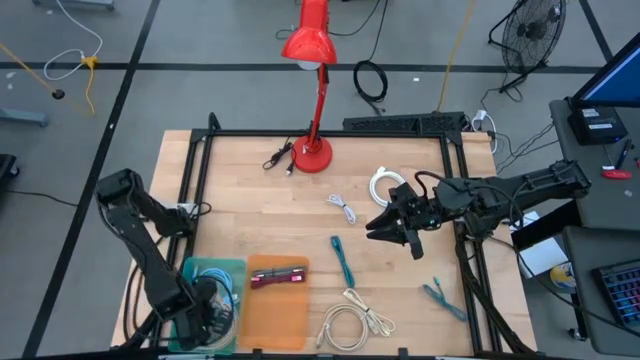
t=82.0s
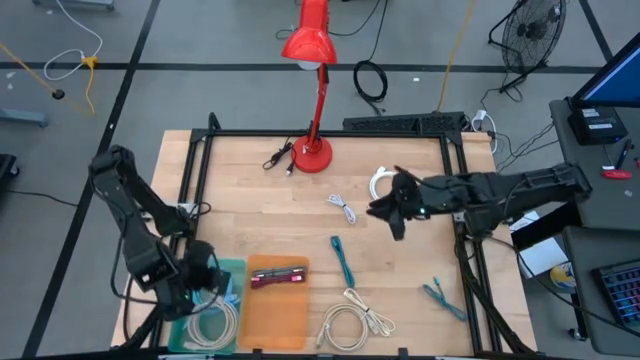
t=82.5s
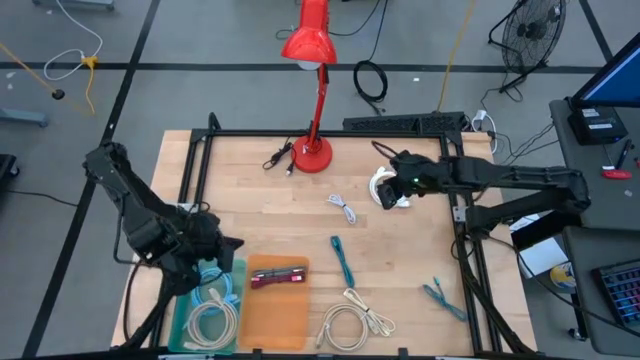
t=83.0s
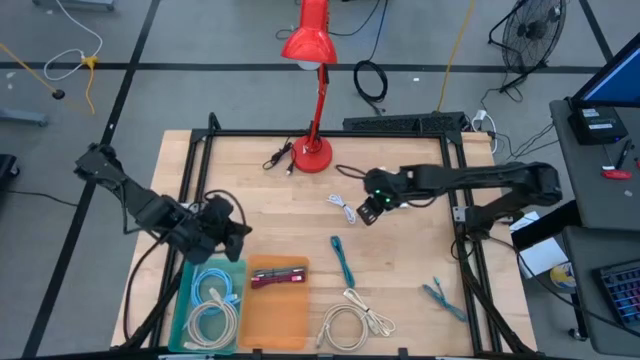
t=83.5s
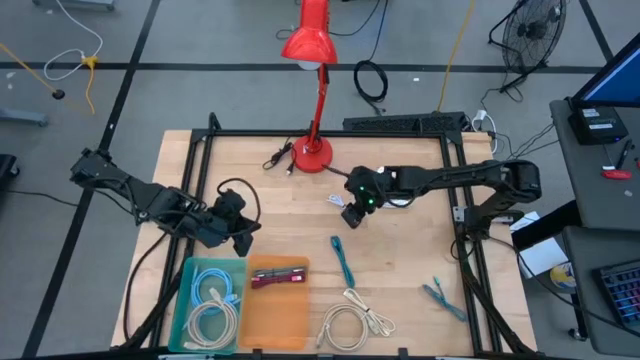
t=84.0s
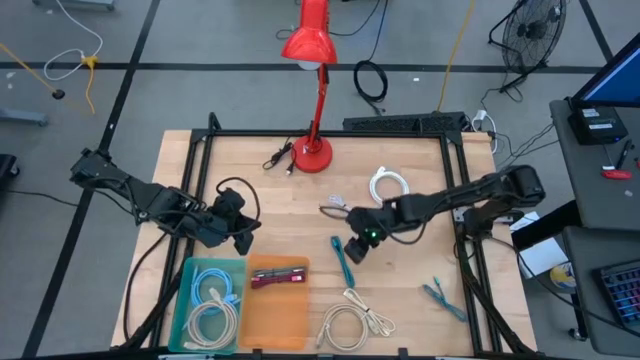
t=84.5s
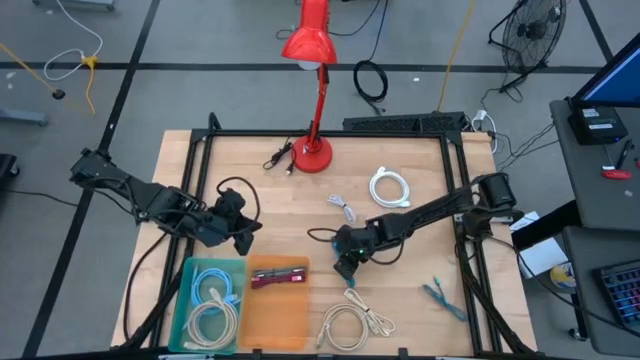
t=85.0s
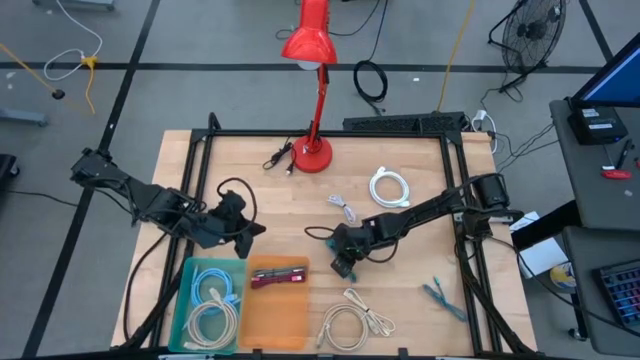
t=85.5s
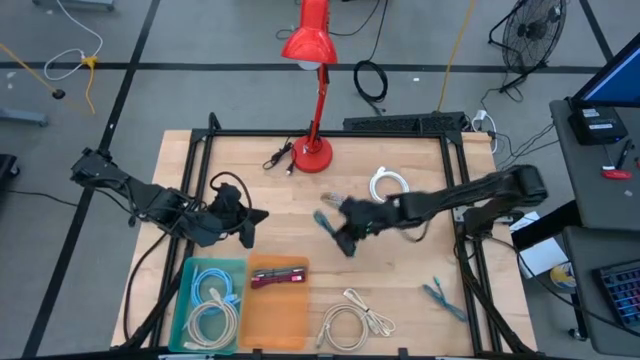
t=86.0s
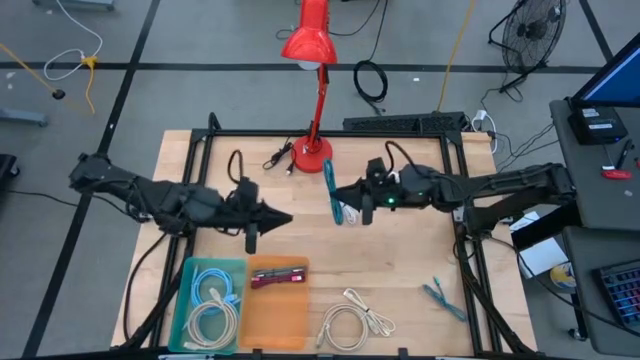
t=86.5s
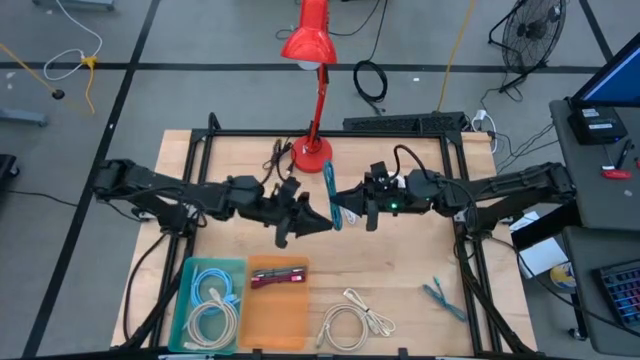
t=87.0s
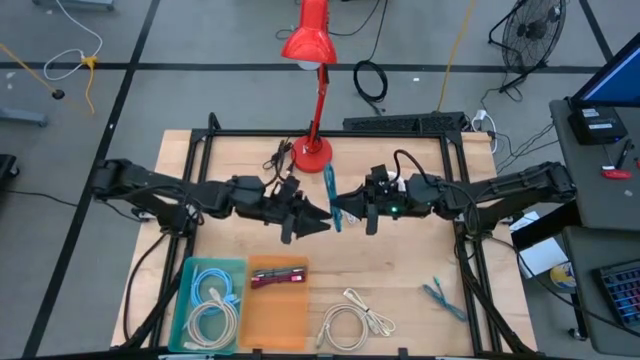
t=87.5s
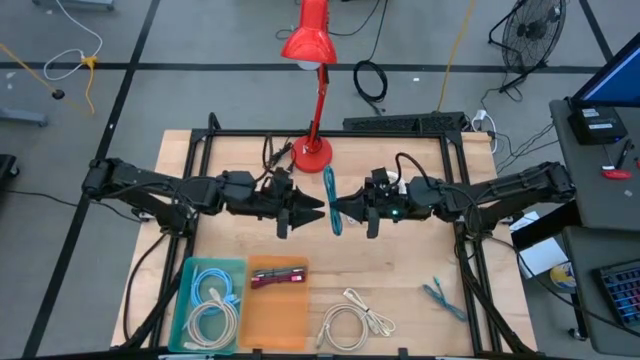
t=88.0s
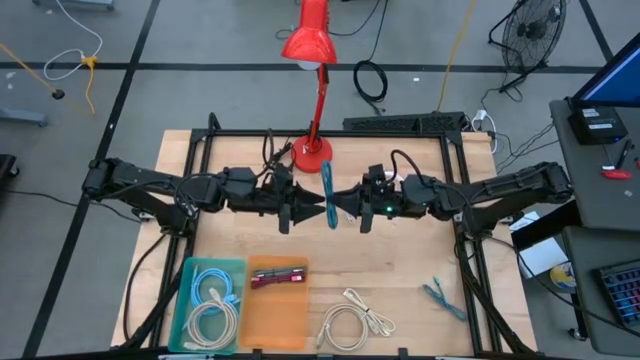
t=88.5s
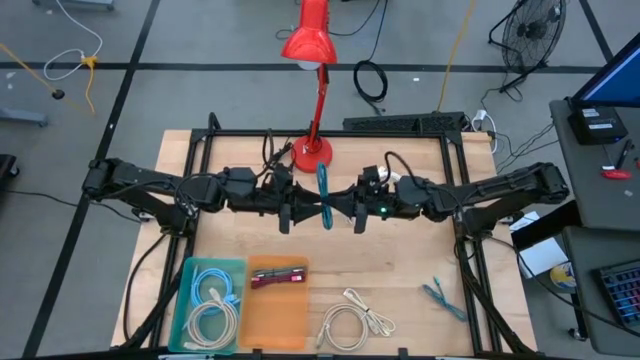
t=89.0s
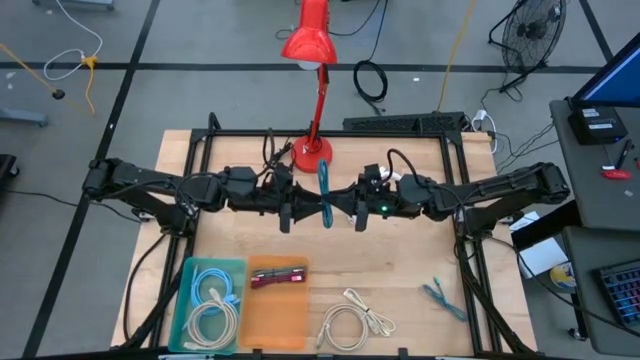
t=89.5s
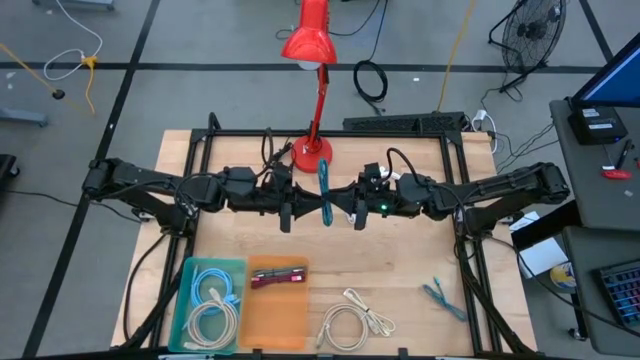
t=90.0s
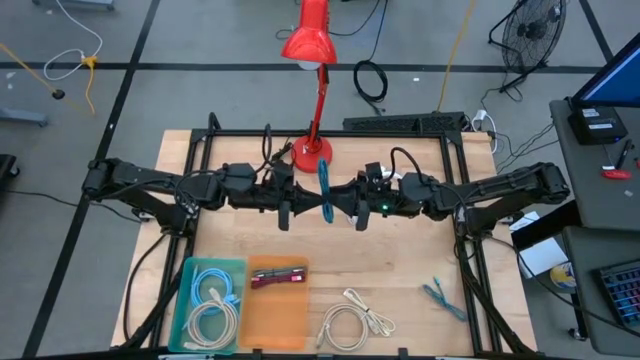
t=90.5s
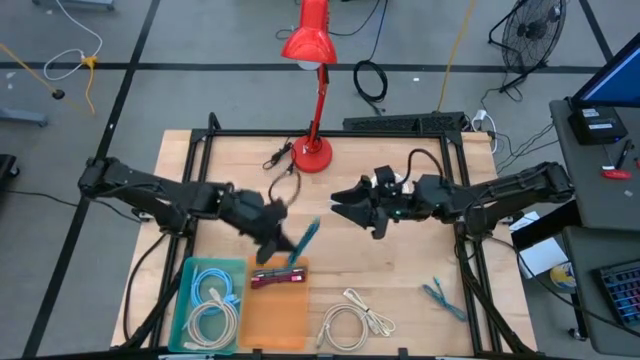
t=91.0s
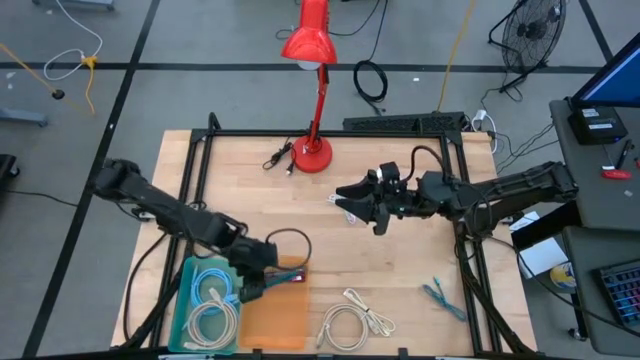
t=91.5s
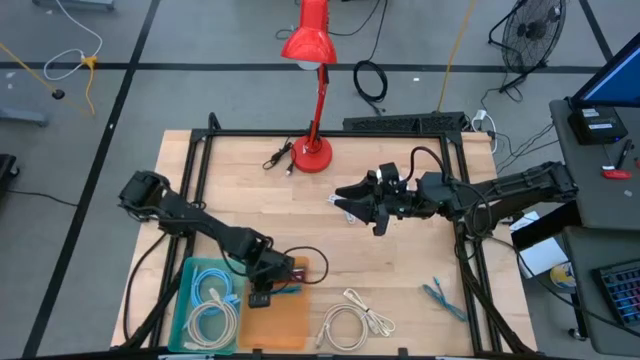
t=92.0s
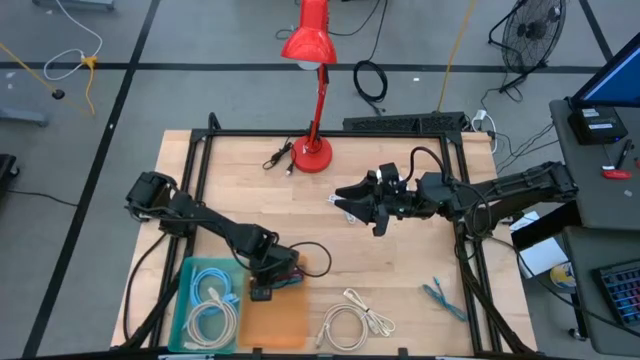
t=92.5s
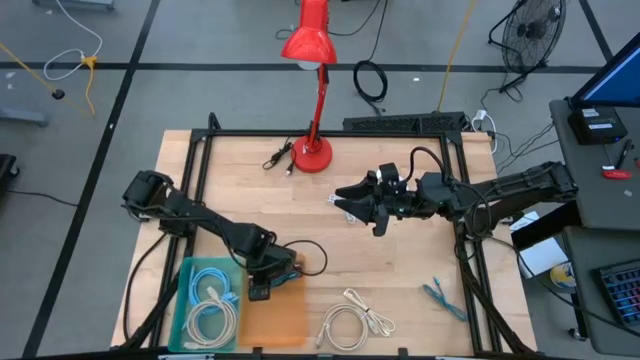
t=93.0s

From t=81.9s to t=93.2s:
Task: Pick & Place USB Port
Put the left blue USB cable into the orange bin

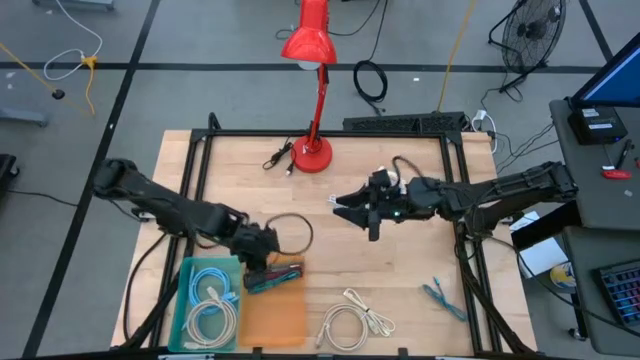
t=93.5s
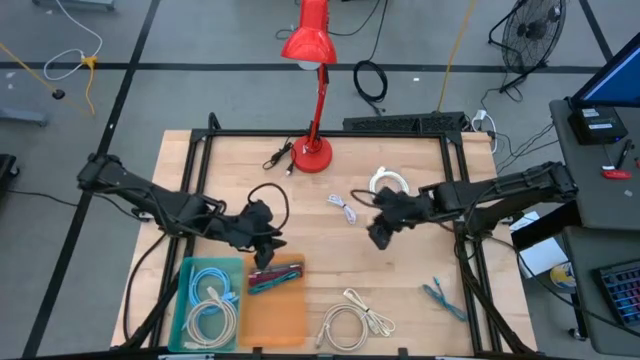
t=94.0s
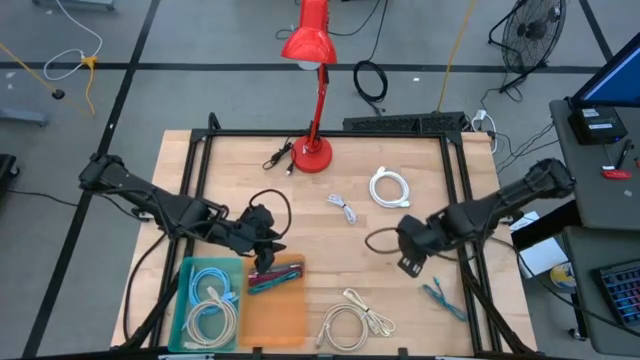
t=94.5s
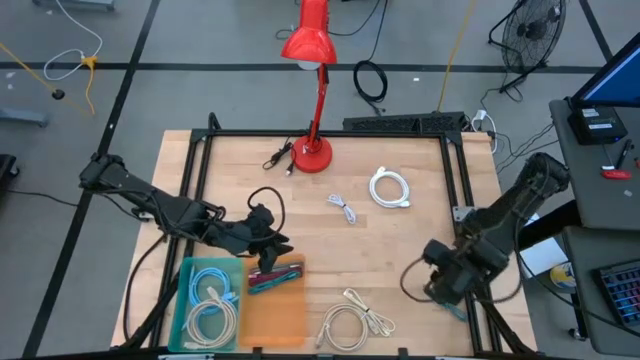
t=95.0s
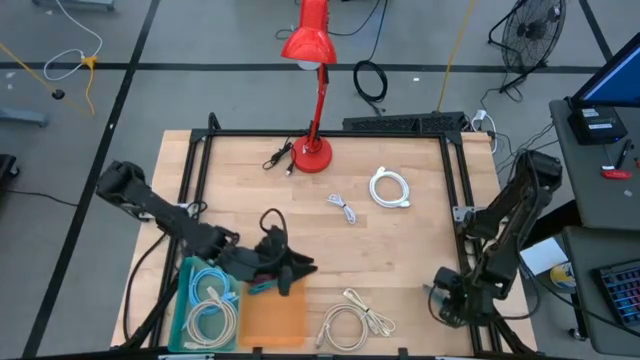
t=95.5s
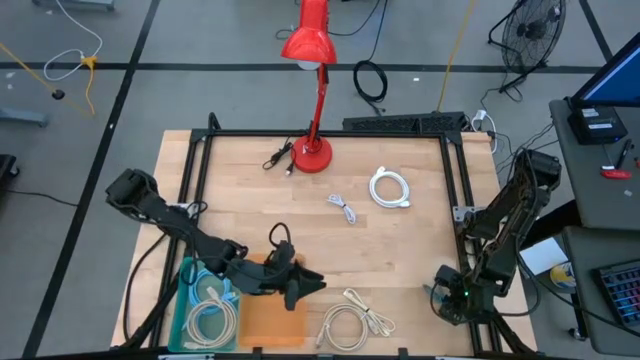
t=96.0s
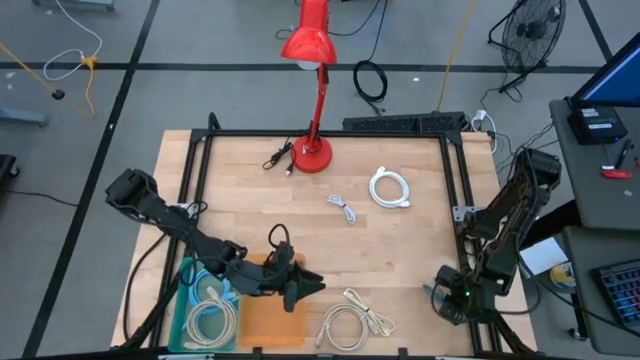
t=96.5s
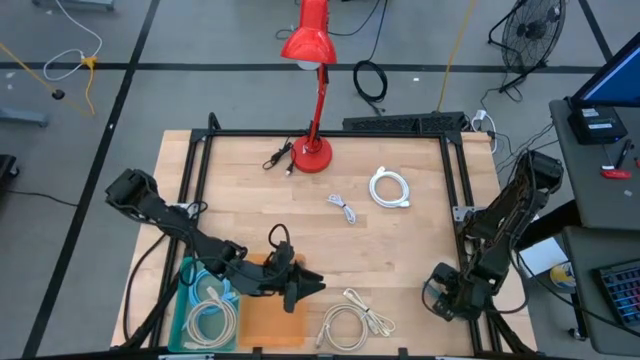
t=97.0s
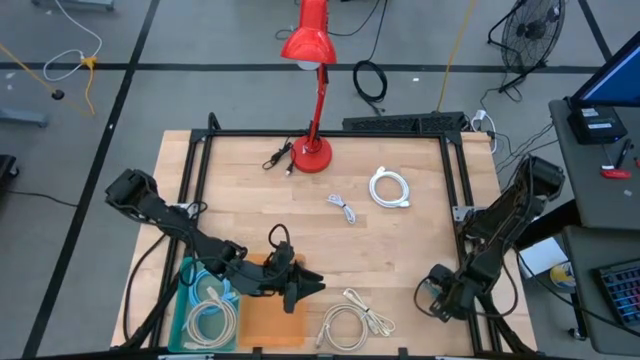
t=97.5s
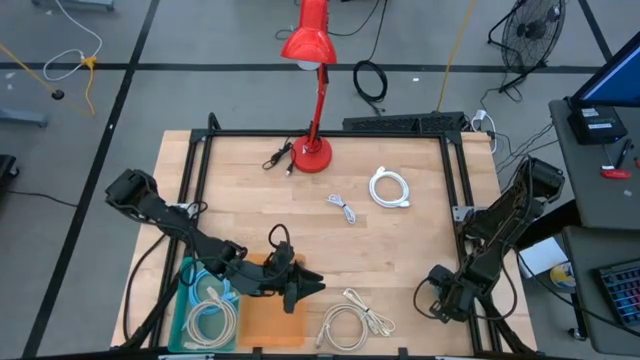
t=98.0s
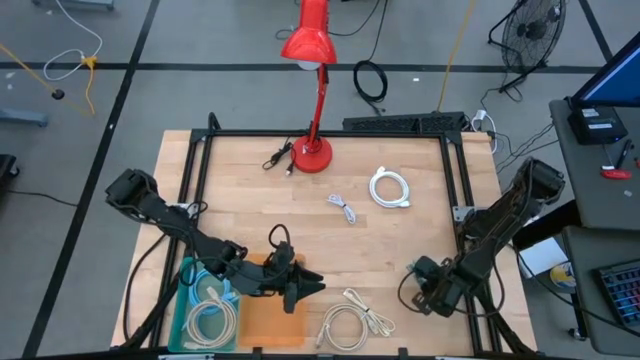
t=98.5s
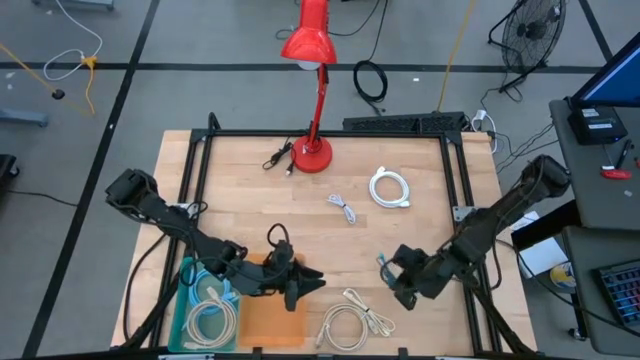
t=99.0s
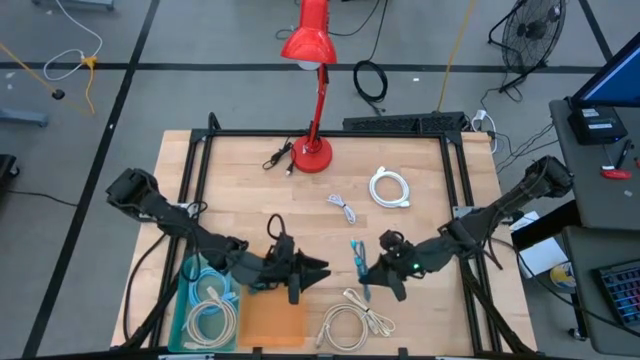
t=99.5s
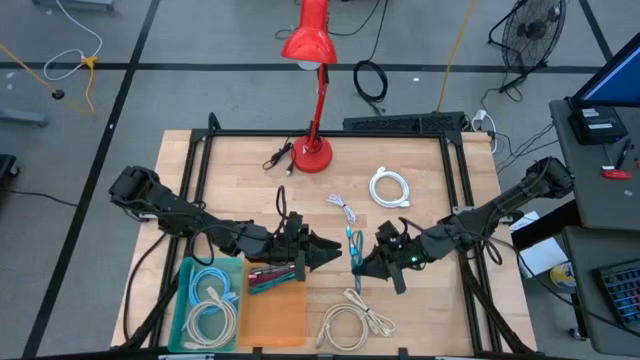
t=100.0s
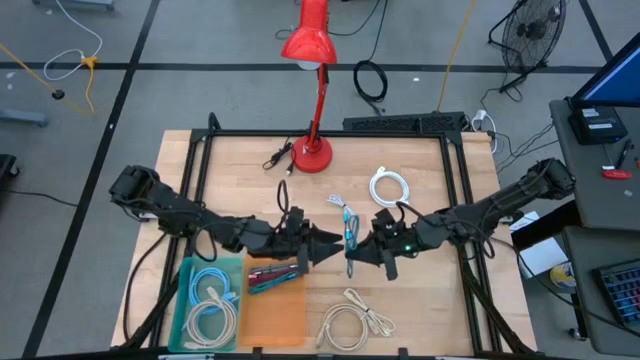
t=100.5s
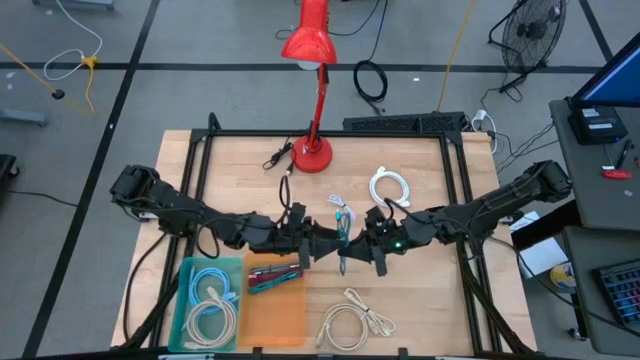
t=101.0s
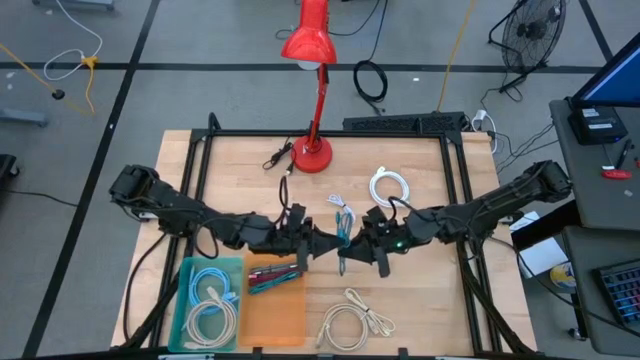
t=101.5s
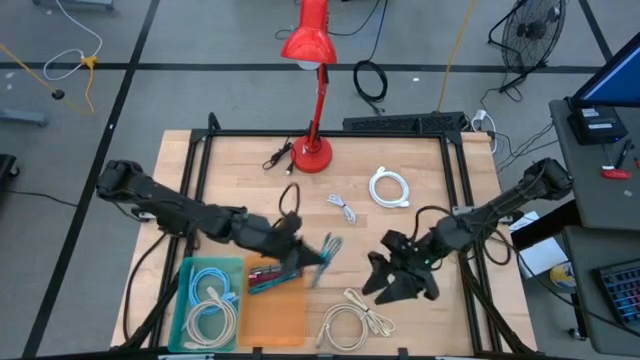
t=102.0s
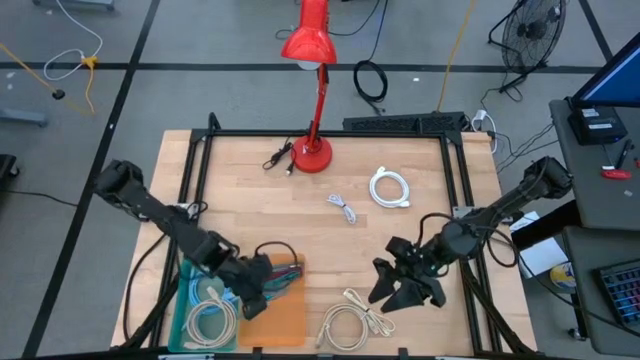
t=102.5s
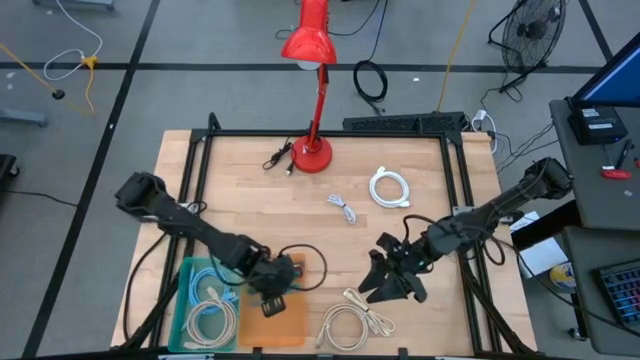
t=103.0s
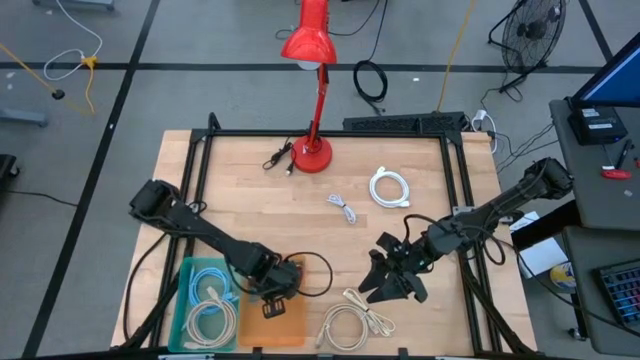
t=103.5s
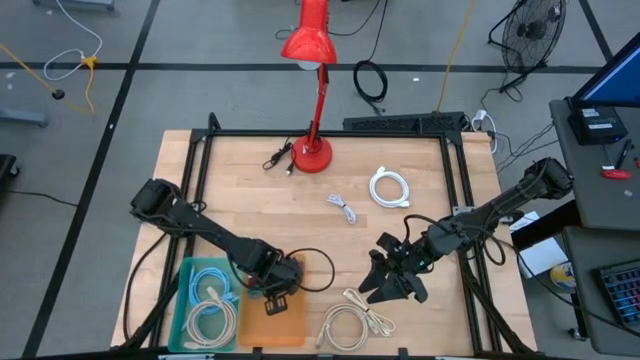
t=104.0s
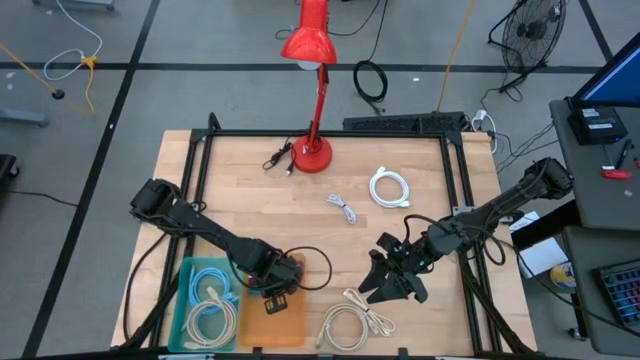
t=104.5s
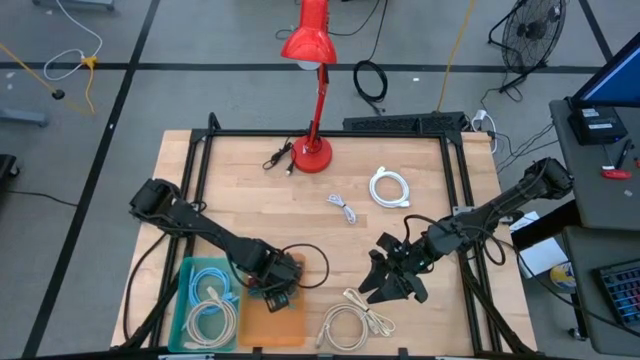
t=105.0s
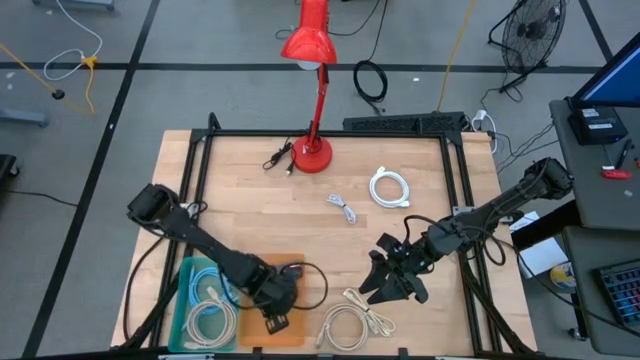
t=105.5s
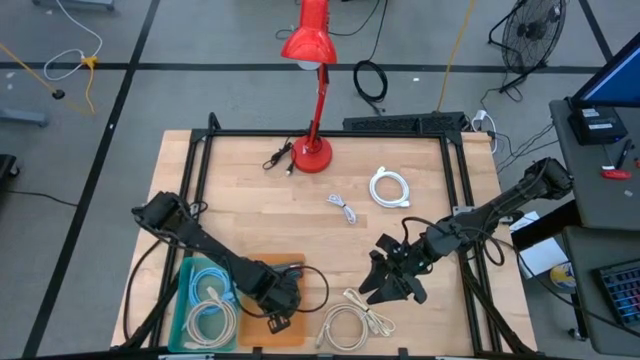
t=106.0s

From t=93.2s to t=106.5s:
Put the blue USB cable into the orange bin
